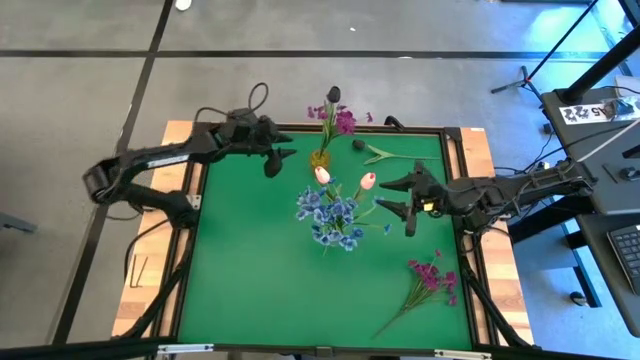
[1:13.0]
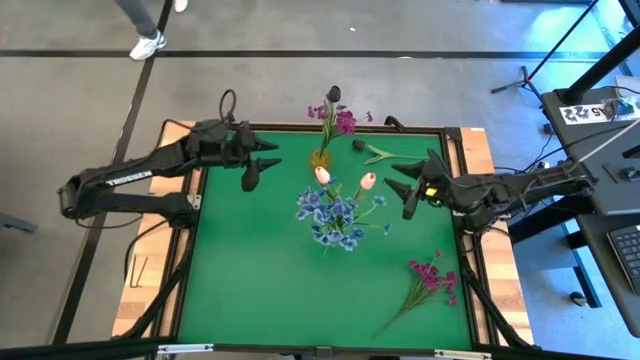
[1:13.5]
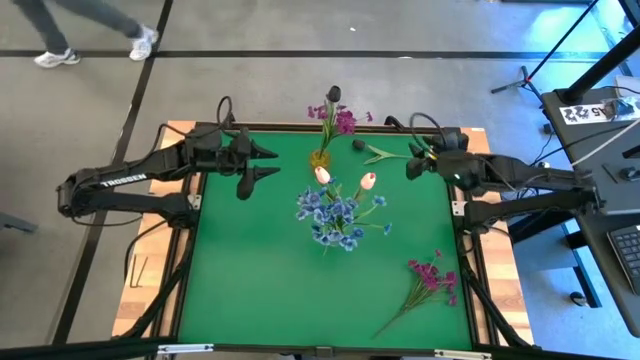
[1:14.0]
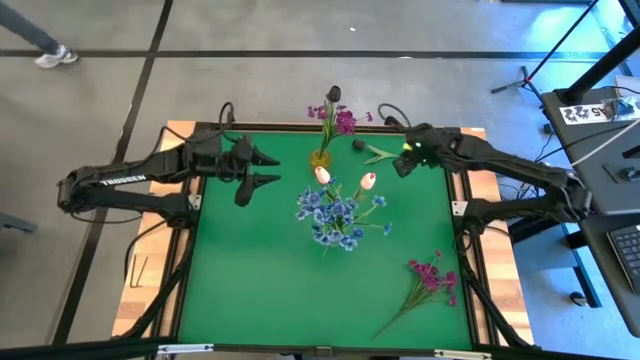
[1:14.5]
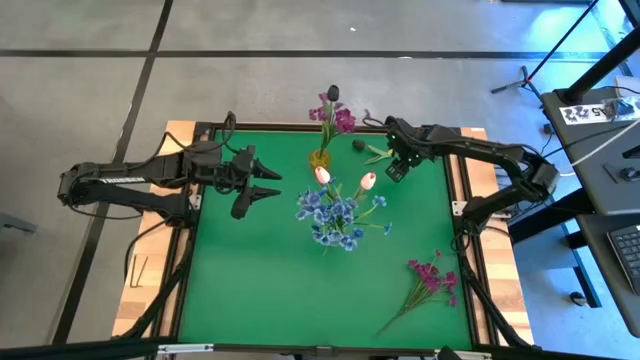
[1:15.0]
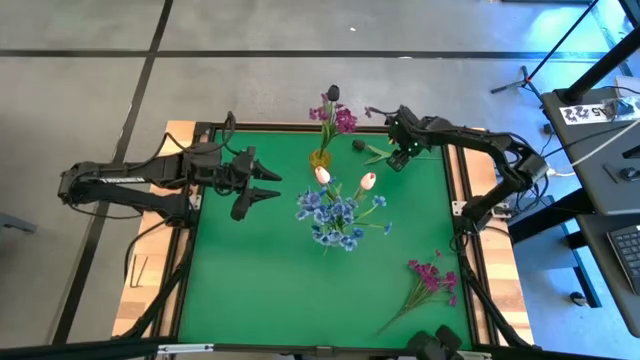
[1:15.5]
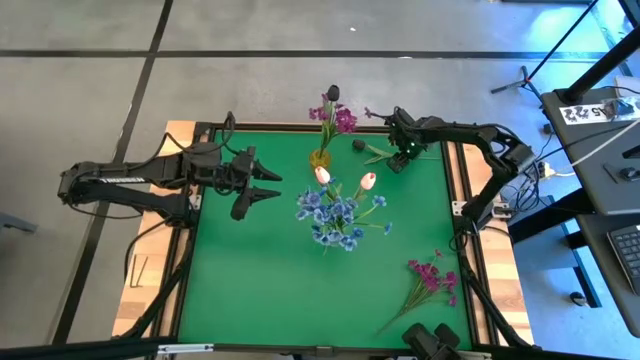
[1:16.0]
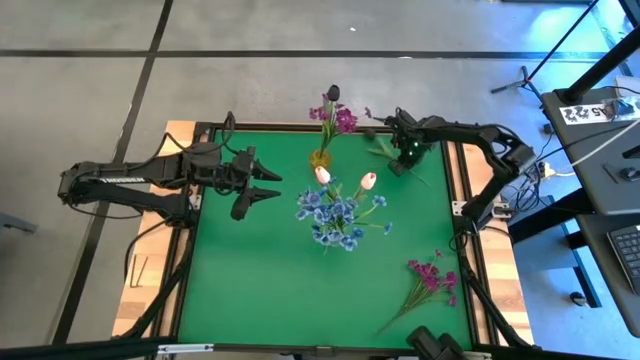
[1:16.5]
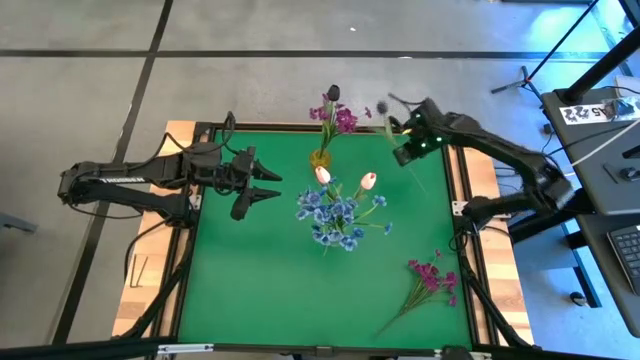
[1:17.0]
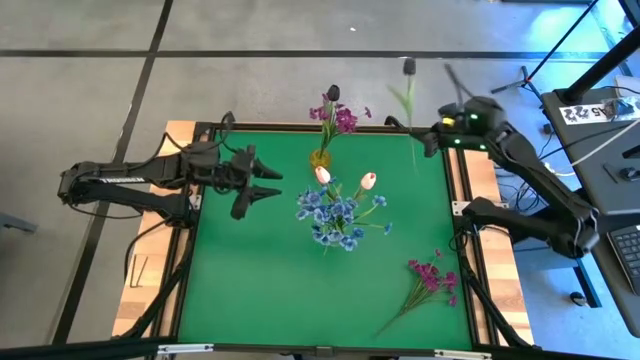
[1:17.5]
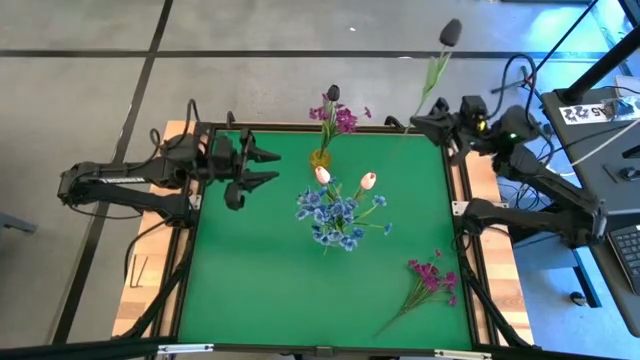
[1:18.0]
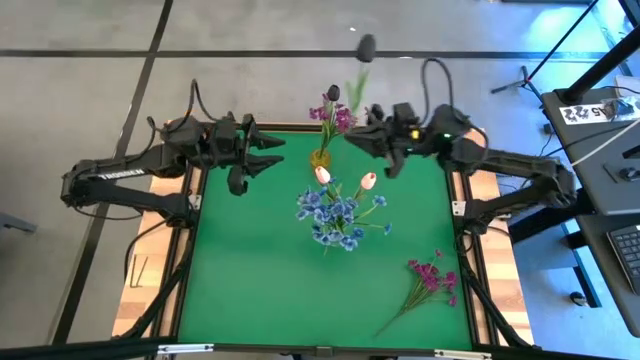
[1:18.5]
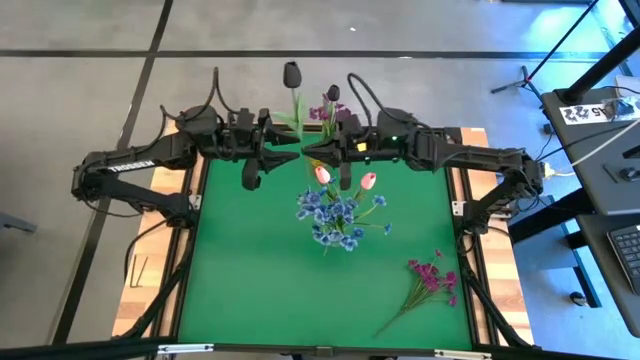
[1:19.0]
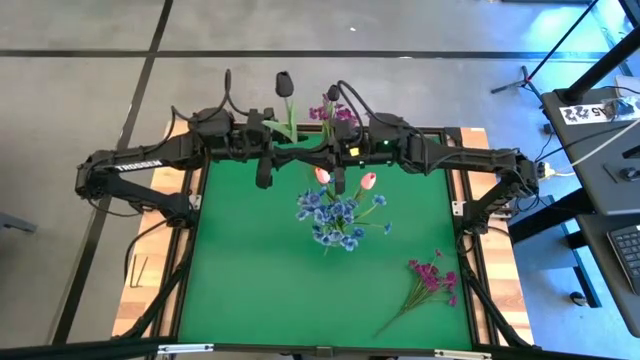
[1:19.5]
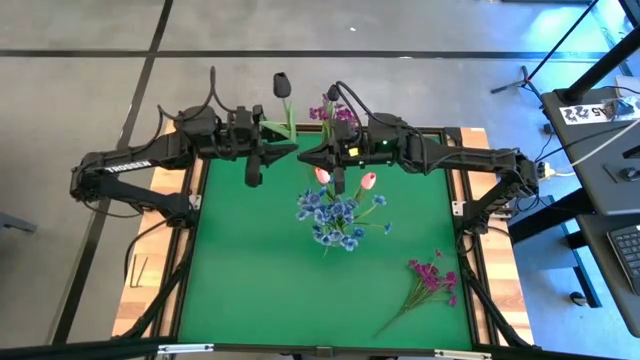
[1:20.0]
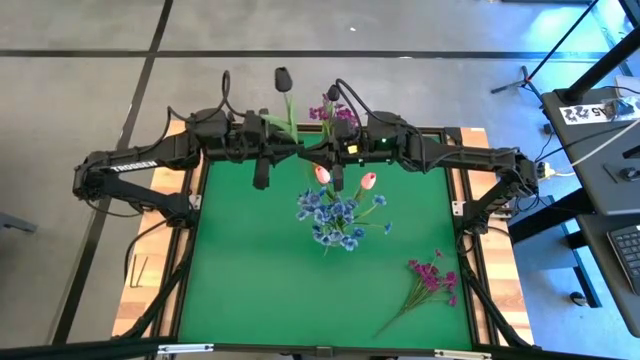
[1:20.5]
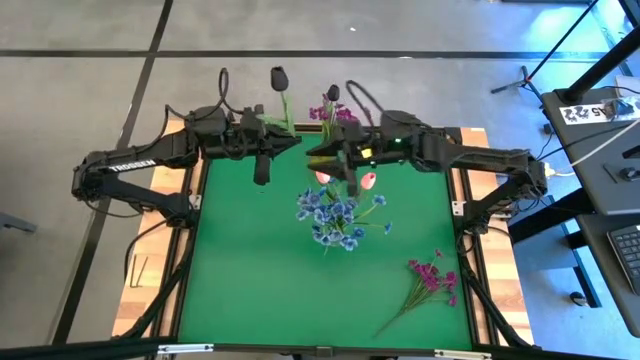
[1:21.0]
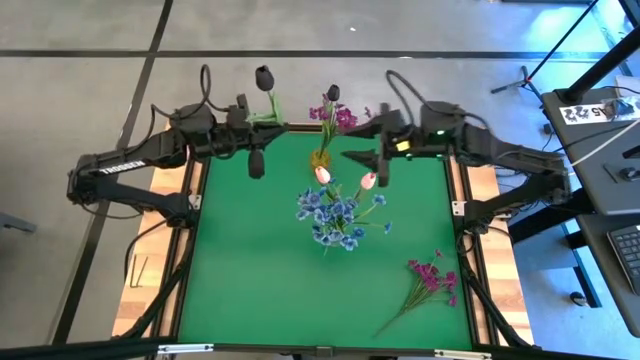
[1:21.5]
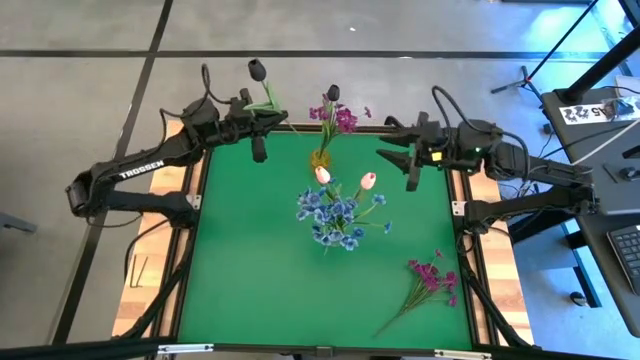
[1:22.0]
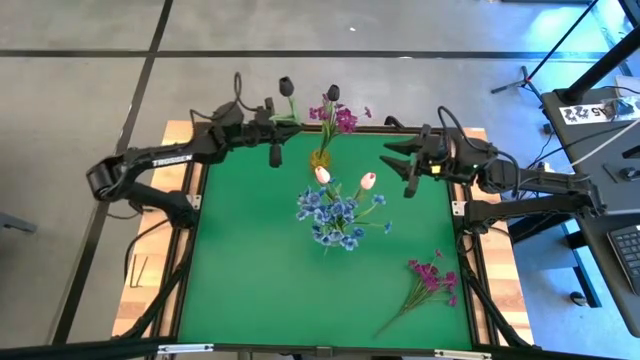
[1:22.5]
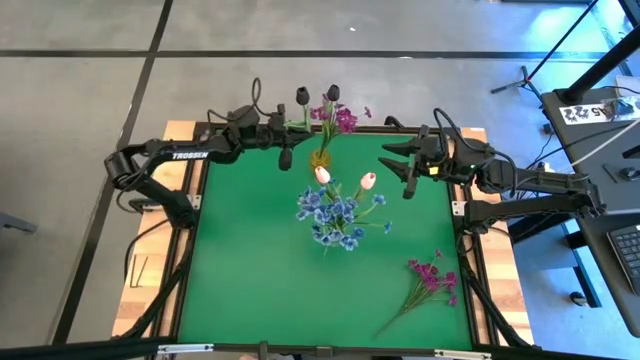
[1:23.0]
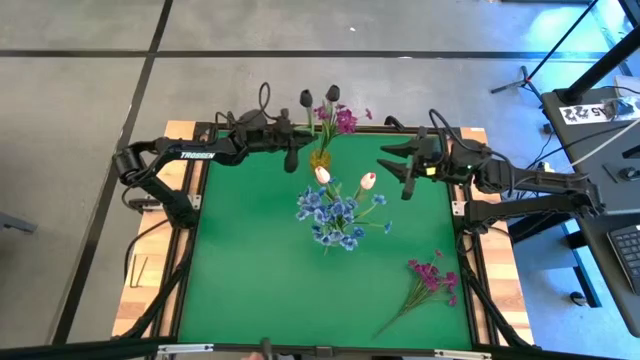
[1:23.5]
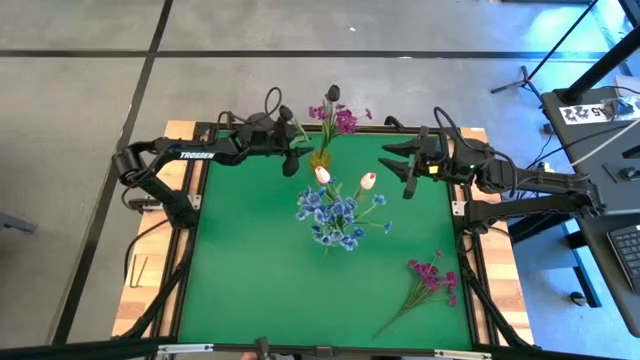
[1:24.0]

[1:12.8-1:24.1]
Task: Sort flowers into vase by color
Put the black flower in the yellow vase

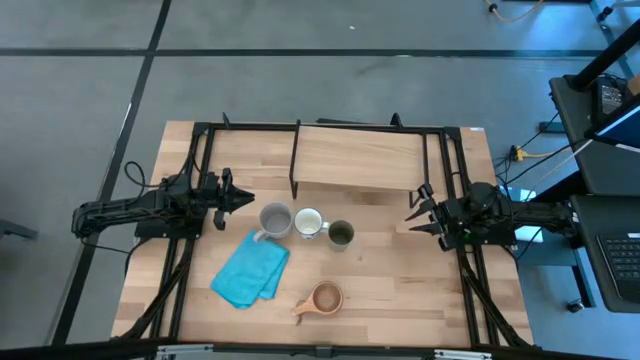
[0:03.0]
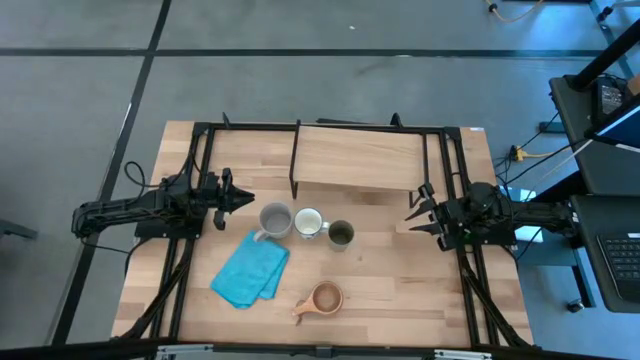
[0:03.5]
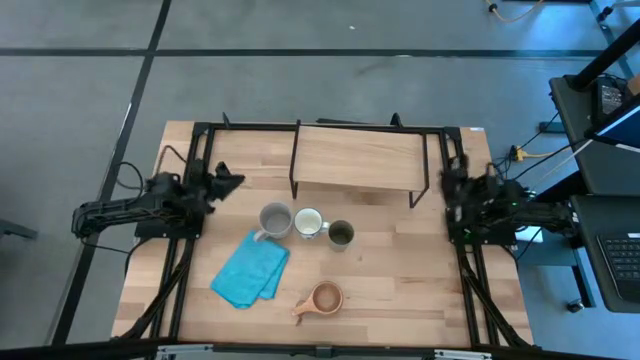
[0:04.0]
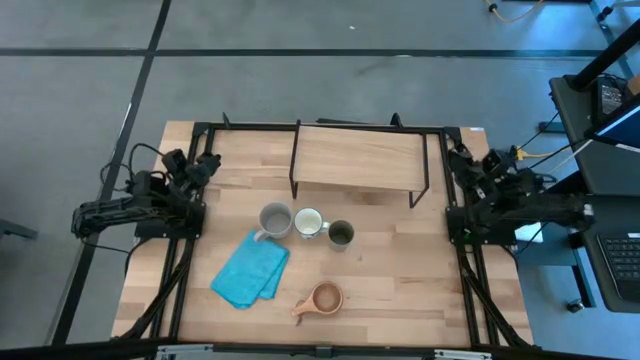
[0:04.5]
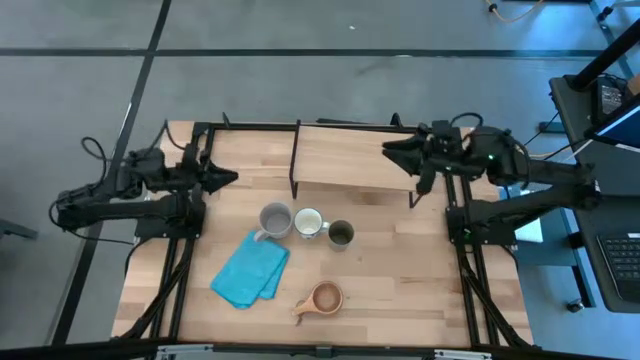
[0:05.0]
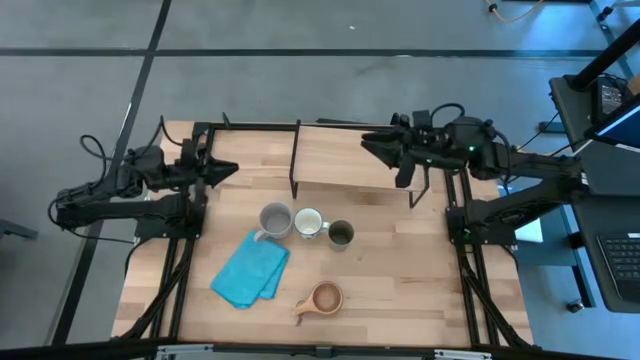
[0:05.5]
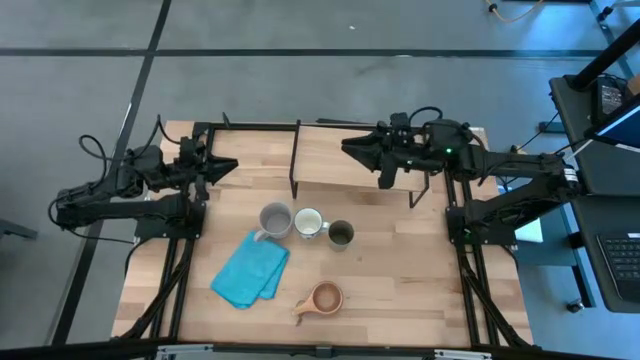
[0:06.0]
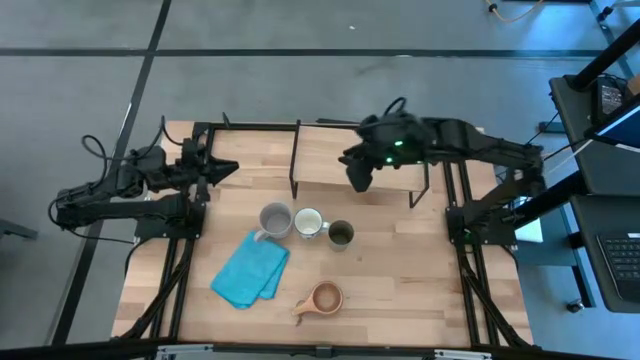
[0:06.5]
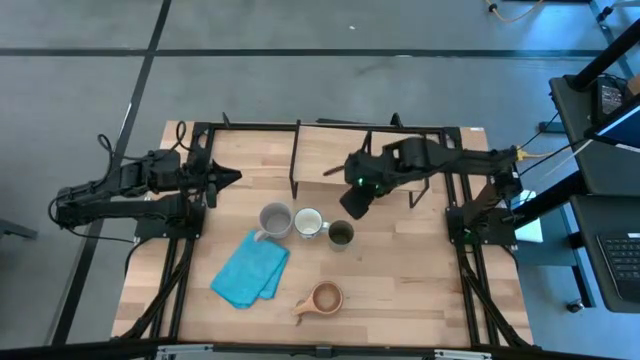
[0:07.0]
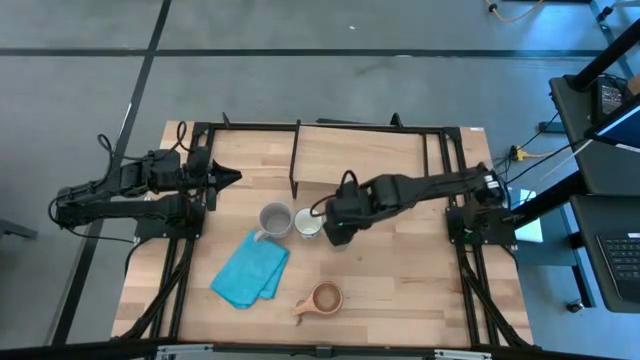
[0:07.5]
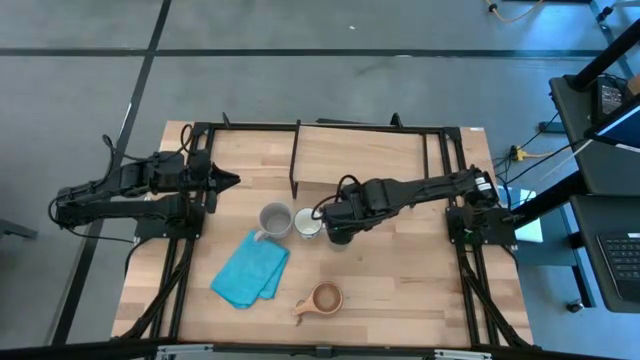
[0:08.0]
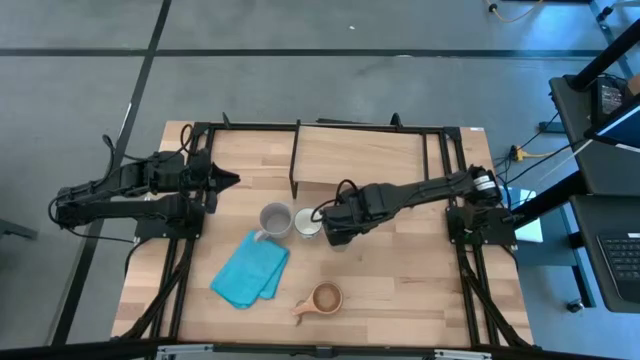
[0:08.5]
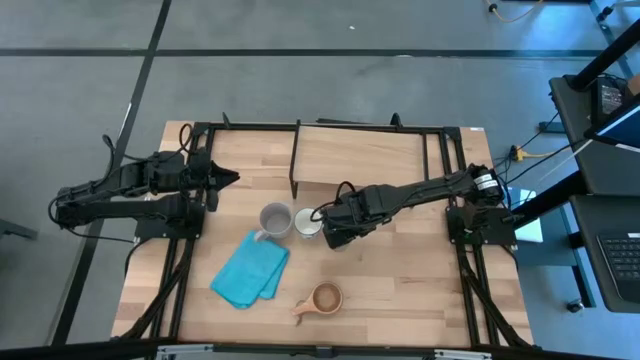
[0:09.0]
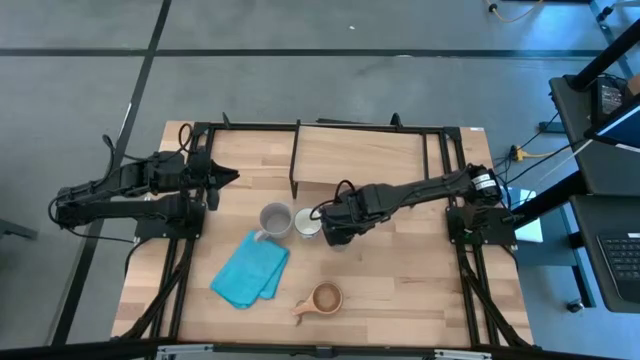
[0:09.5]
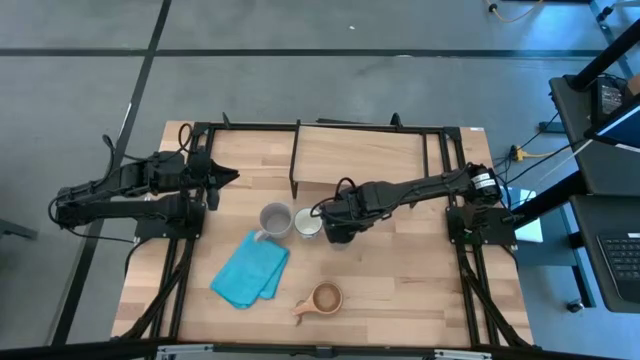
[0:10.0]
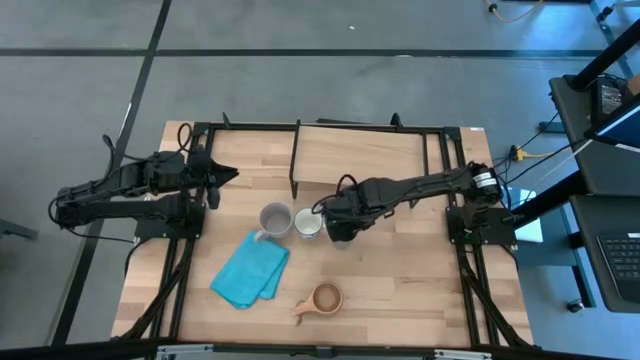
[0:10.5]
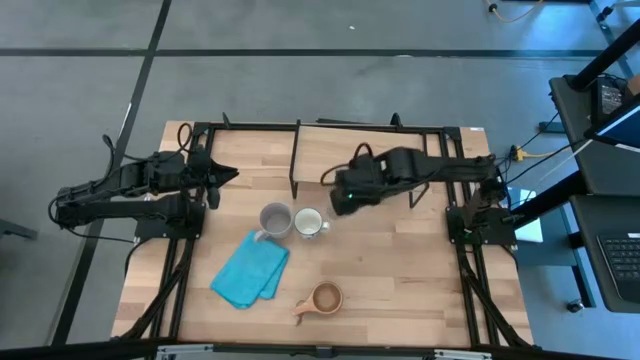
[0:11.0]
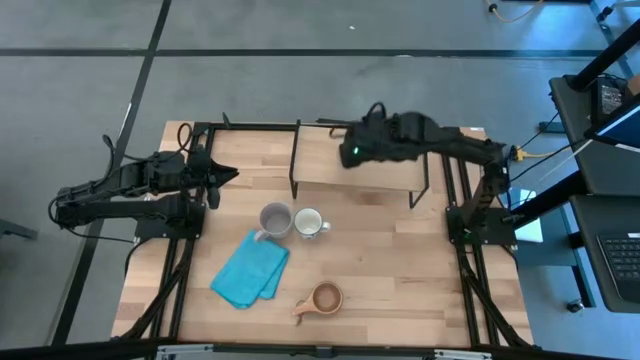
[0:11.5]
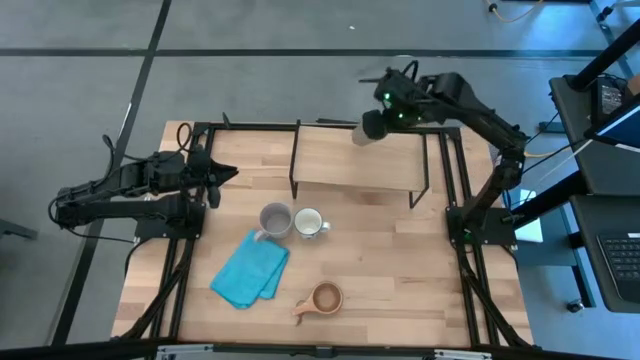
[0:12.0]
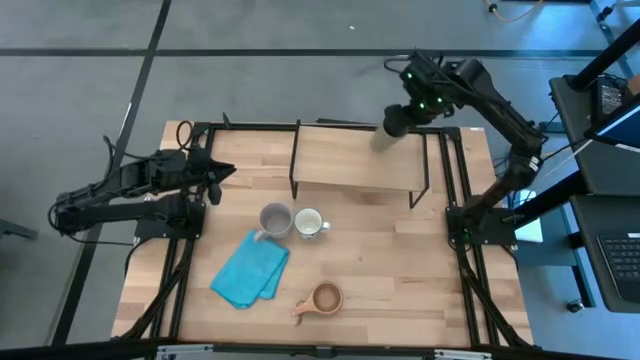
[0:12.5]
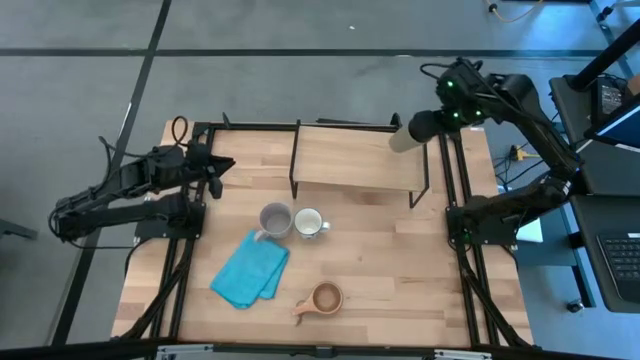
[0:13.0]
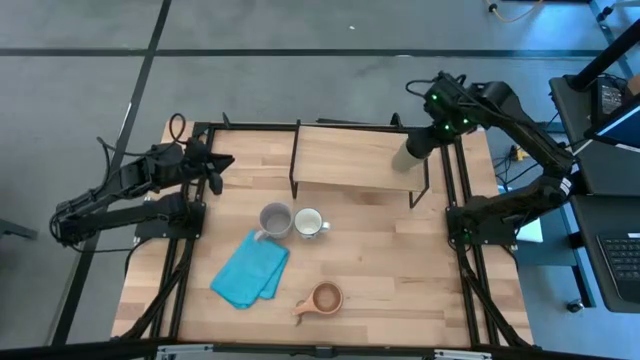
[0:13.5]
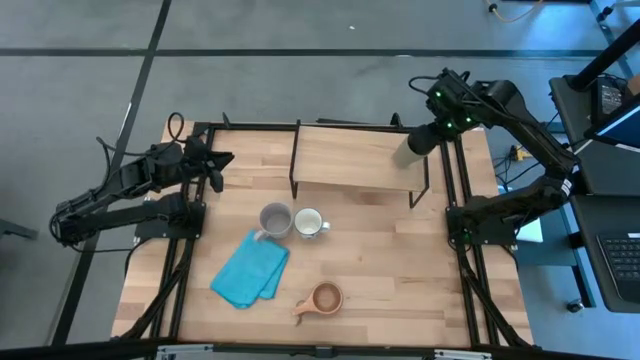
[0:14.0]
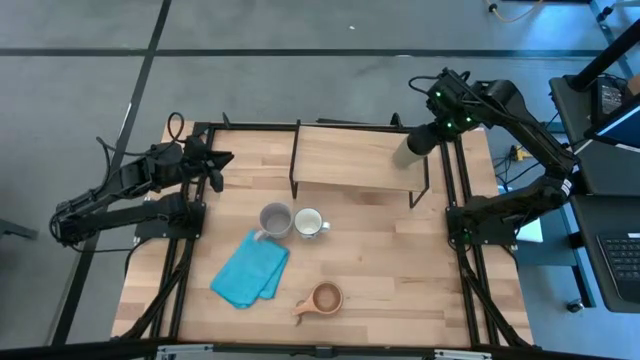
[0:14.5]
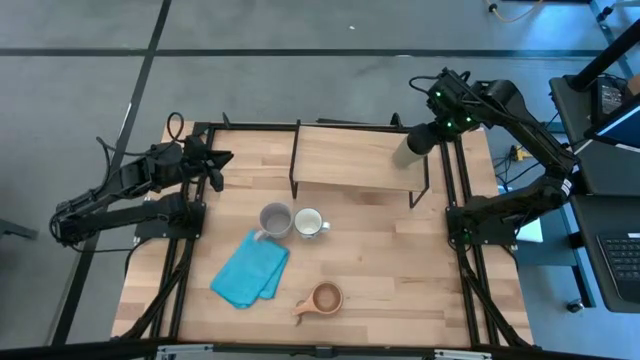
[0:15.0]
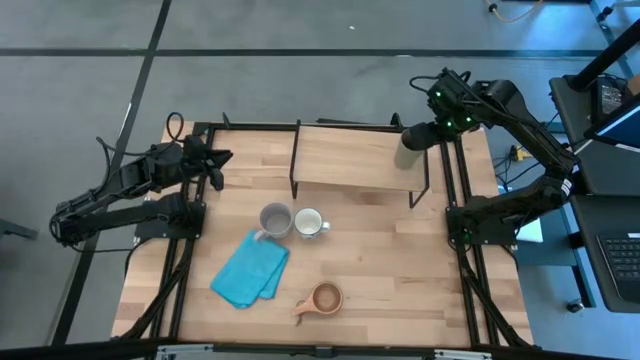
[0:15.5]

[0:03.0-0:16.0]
Task: Stack small to large cups/mugs on shelf
Put the gray cup on the shelf
